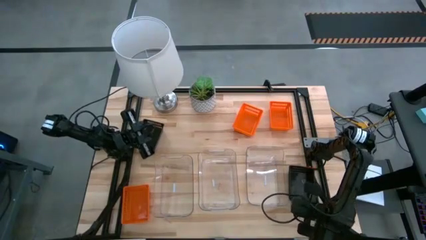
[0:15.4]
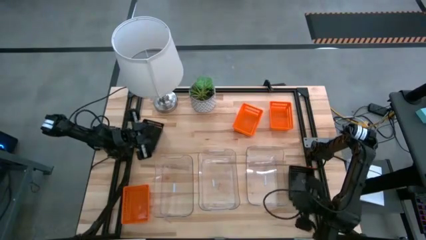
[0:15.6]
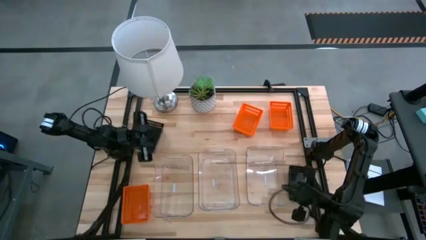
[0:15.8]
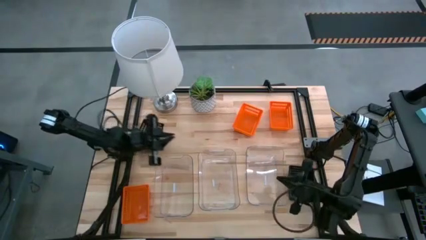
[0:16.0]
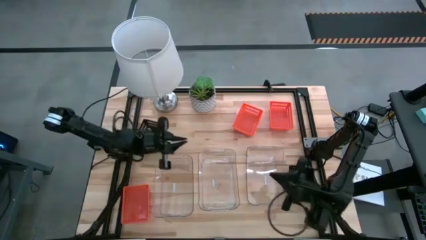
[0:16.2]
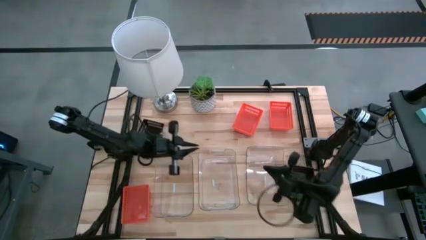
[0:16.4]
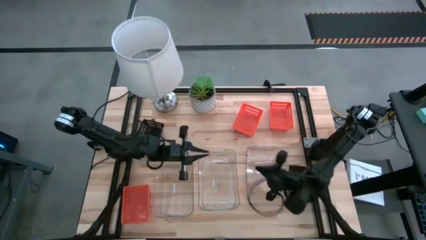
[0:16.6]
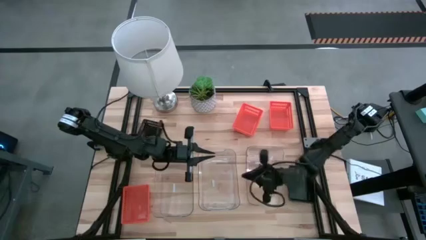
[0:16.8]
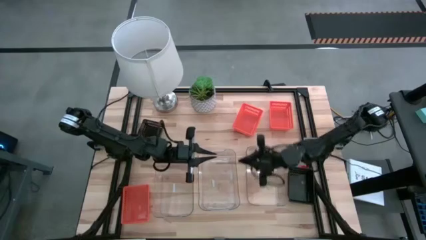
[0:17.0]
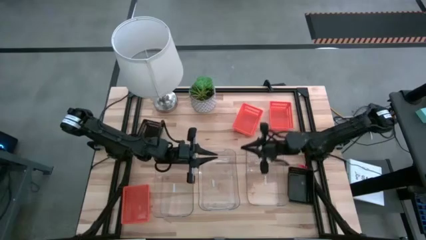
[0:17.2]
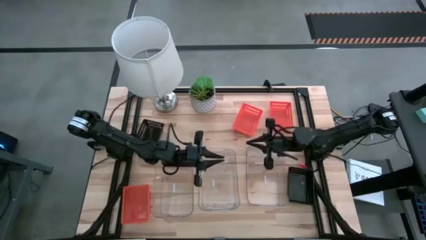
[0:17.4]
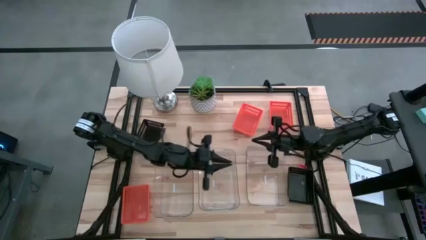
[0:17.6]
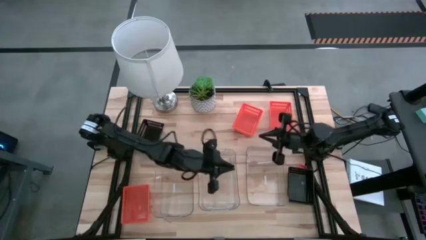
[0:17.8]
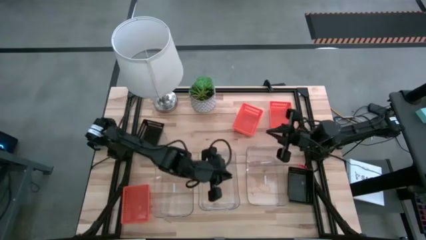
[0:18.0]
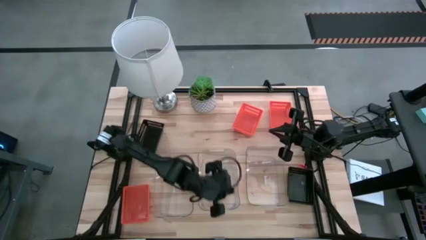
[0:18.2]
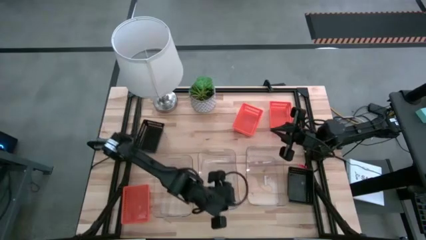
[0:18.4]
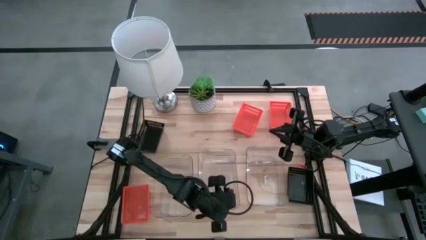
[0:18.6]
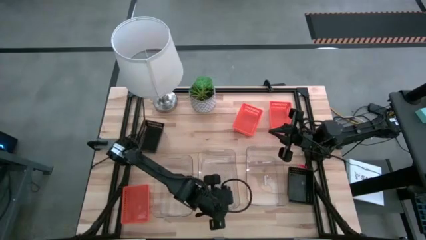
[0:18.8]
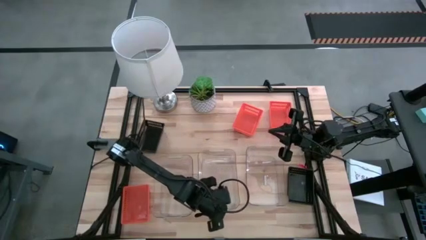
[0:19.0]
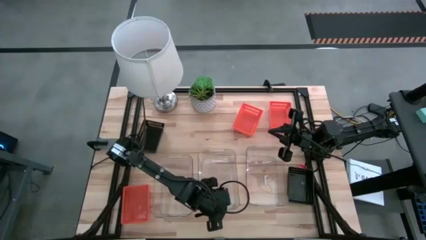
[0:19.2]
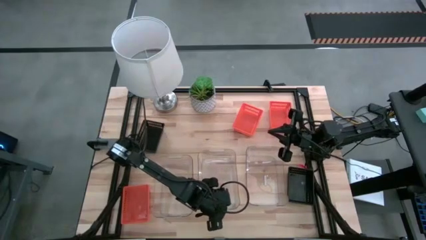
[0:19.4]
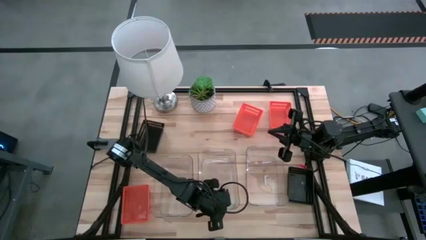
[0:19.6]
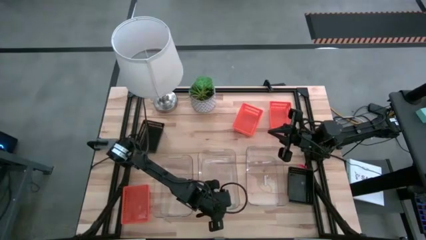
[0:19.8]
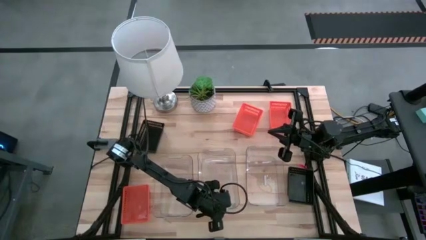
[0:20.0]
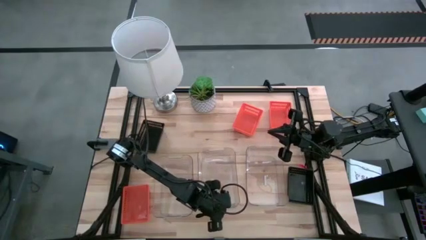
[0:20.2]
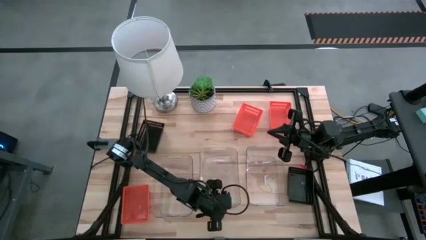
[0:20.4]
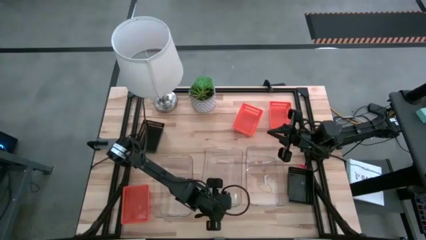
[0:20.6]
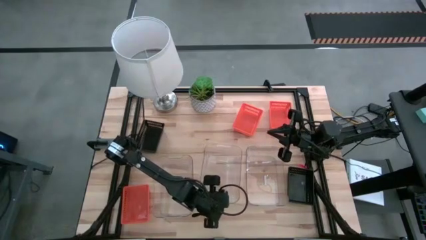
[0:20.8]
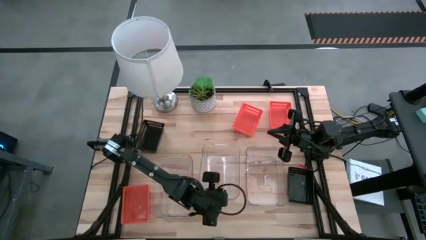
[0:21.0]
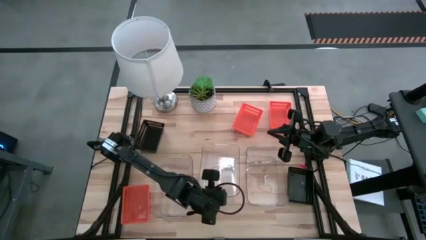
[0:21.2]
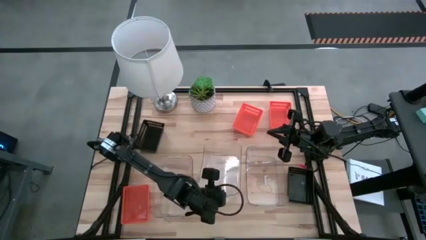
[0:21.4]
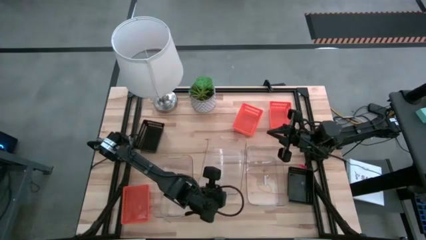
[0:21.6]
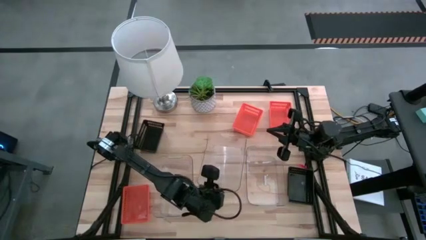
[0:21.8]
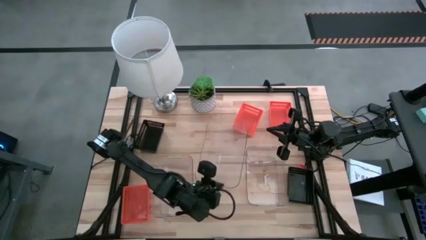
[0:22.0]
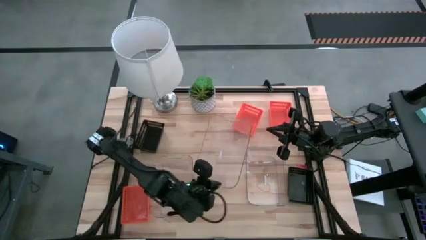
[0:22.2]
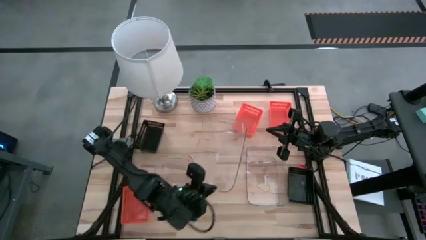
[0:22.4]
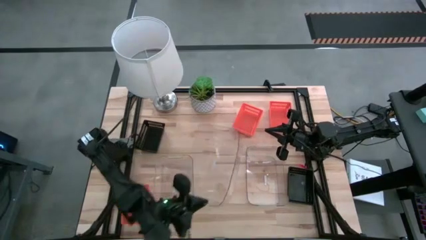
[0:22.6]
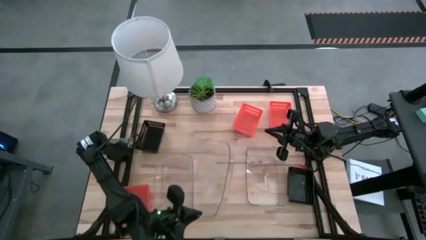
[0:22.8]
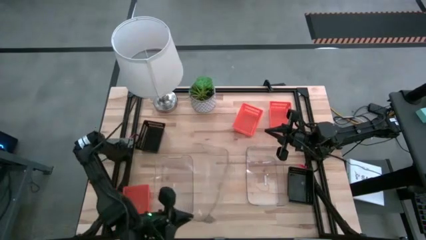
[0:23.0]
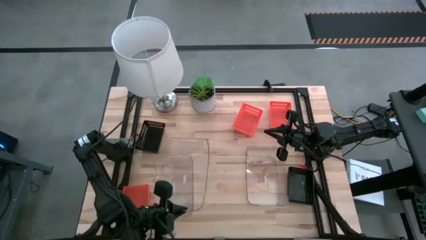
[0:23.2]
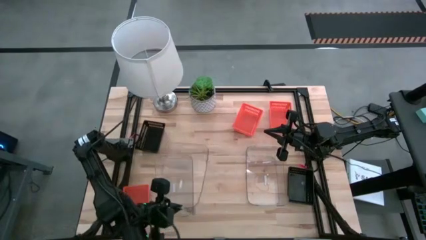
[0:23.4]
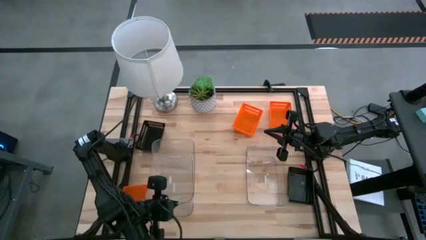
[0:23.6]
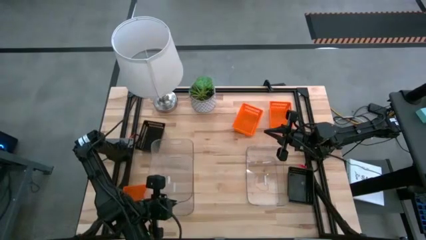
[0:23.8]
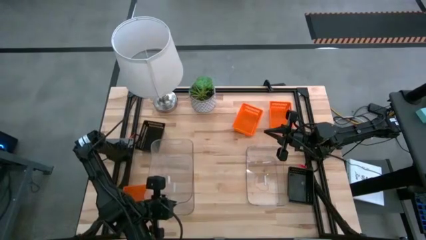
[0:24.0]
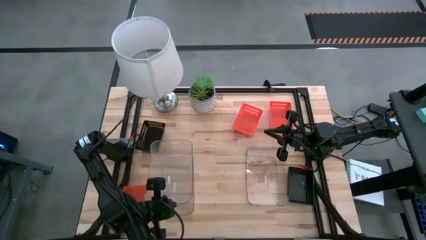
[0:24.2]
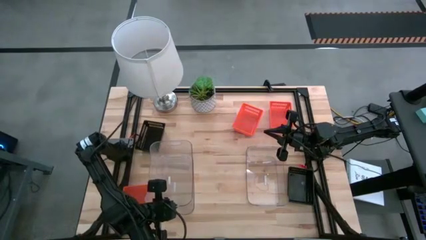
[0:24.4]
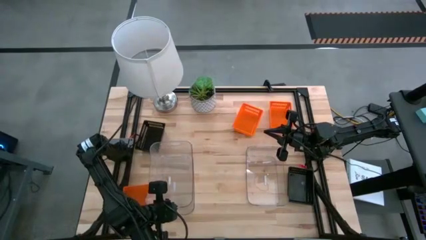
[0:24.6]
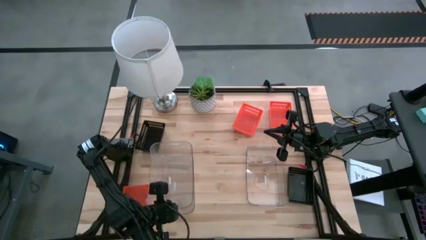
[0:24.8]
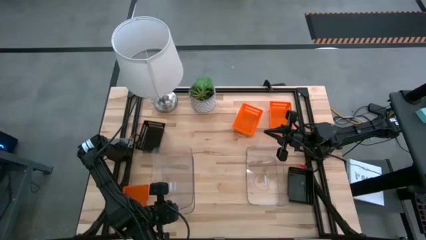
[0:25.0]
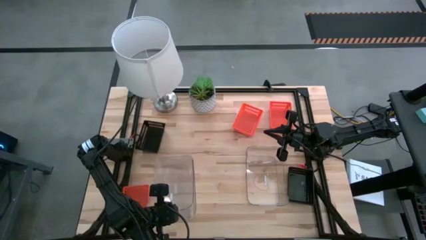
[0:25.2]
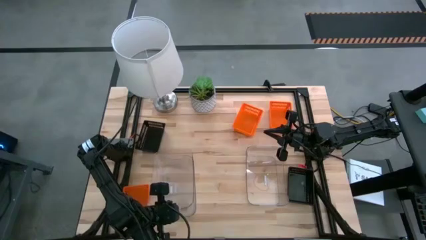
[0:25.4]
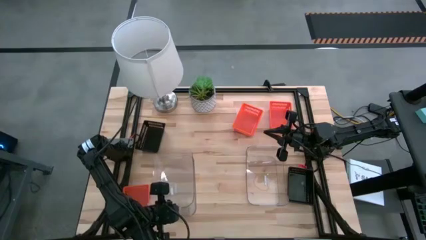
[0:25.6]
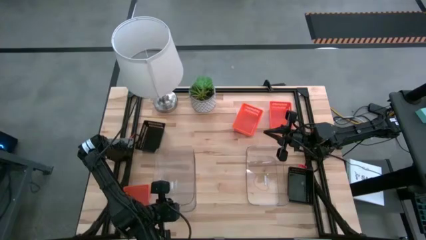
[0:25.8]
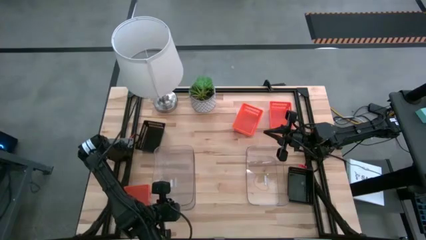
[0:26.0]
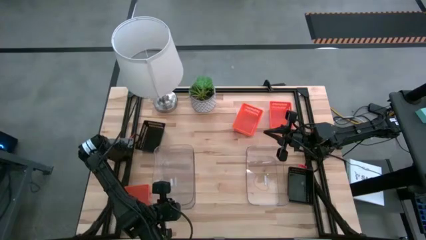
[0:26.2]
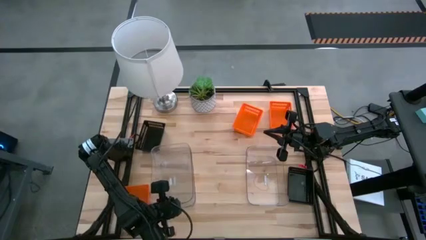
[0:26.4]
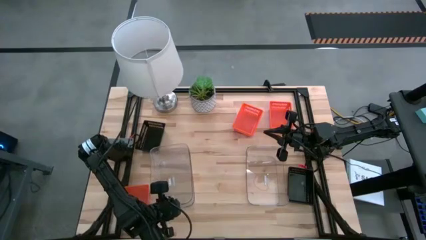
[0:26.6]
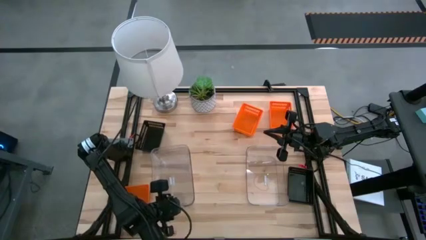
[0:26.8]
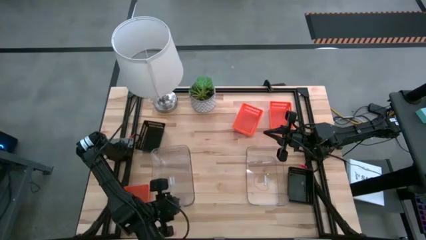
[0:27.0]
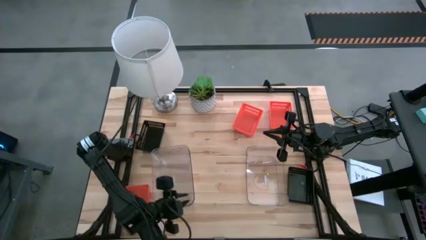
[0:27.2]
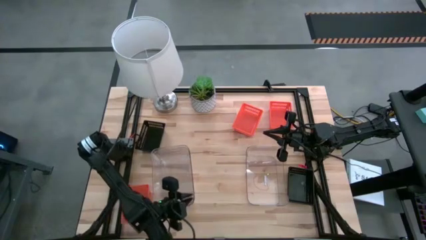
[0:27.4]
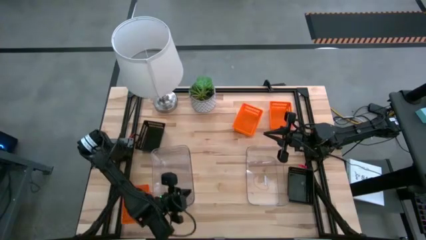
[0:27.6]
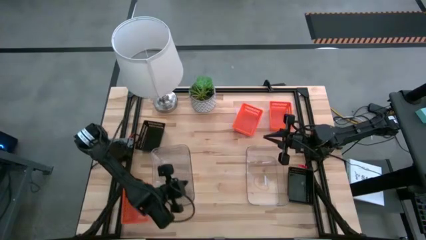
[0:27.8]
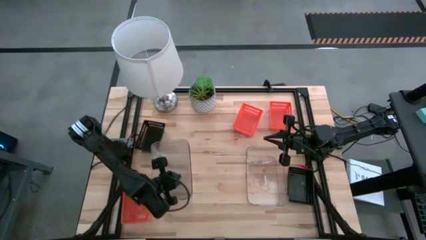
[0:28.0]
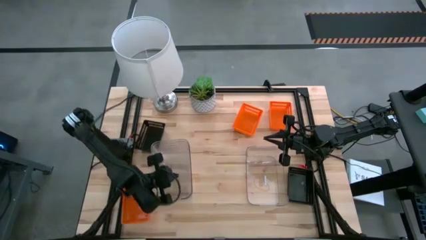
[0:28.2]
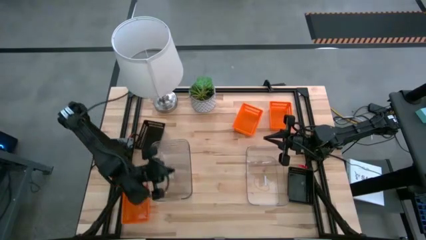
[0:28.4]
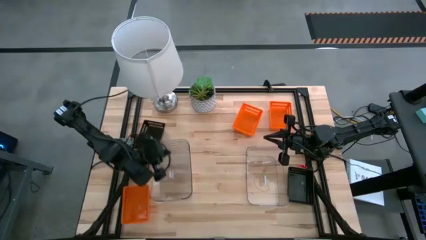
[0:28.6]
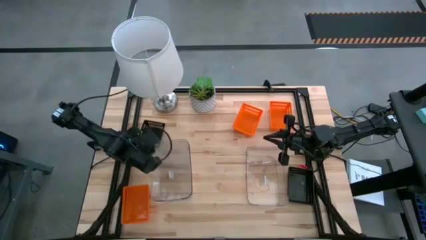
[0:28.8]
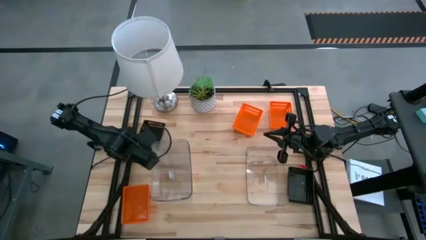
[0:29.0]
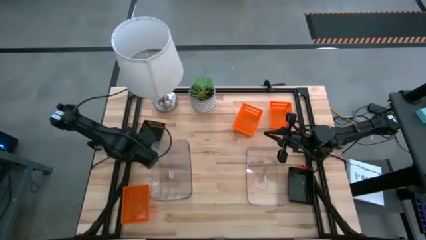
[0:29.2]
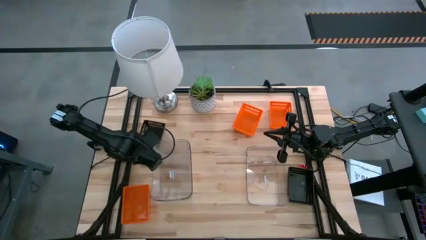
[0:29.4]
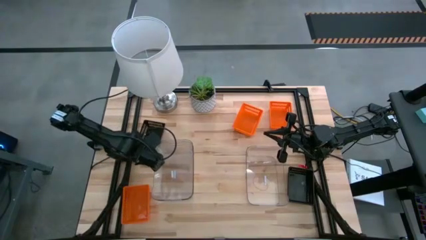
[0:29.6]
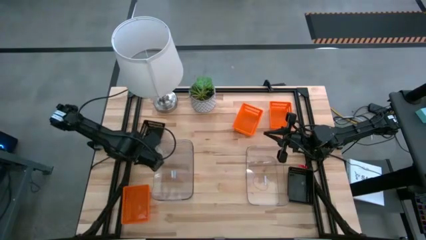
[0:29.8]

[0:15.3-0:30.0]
Stack the center transparent bin on the left transparent bin
